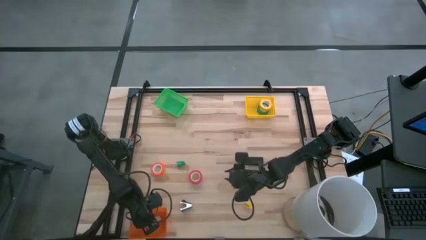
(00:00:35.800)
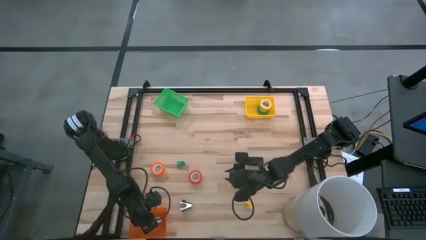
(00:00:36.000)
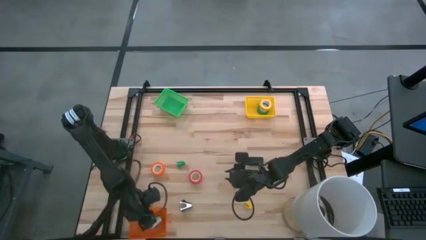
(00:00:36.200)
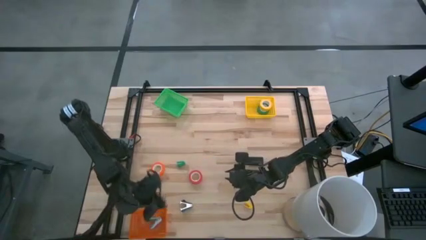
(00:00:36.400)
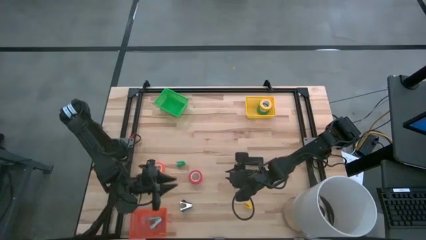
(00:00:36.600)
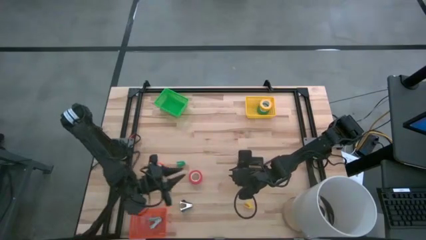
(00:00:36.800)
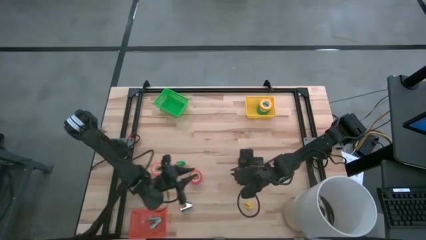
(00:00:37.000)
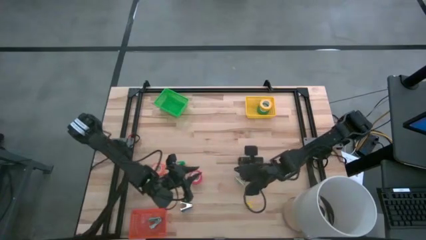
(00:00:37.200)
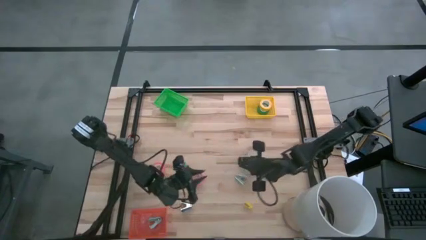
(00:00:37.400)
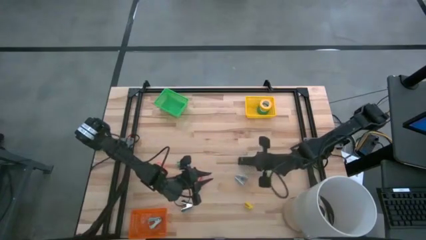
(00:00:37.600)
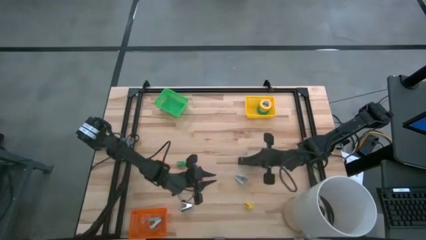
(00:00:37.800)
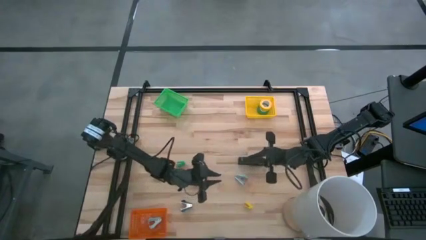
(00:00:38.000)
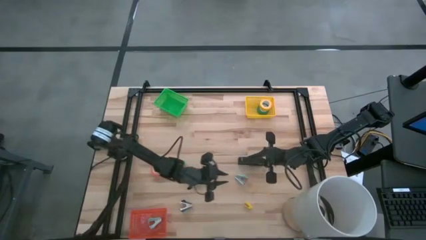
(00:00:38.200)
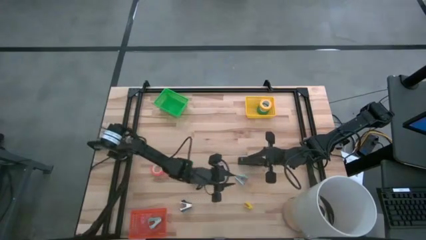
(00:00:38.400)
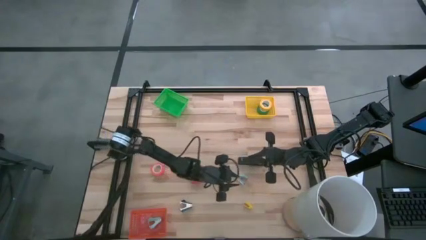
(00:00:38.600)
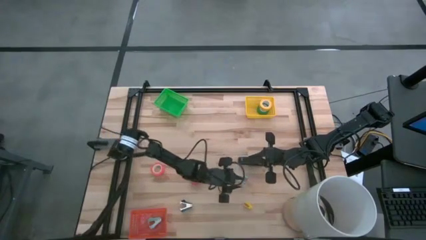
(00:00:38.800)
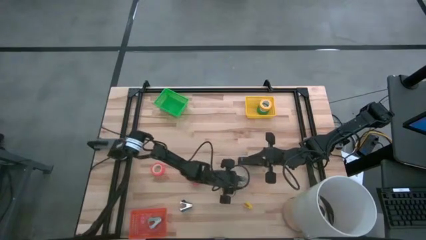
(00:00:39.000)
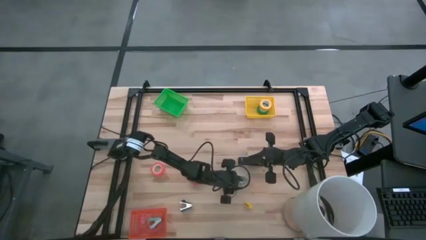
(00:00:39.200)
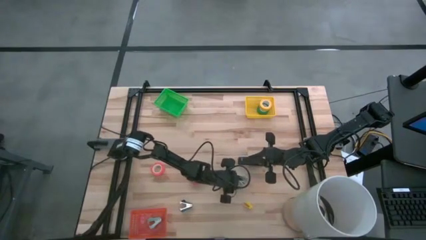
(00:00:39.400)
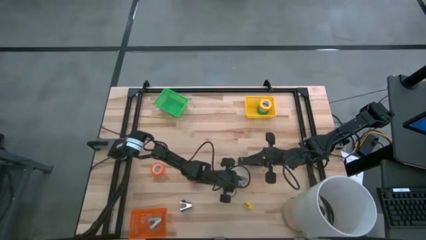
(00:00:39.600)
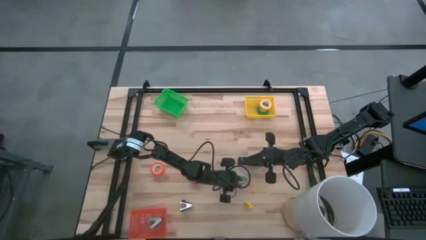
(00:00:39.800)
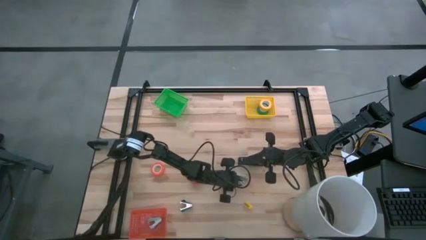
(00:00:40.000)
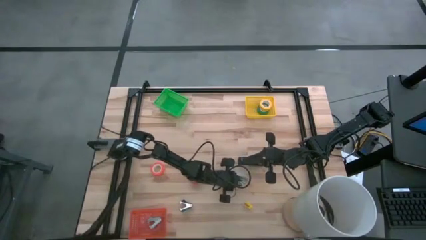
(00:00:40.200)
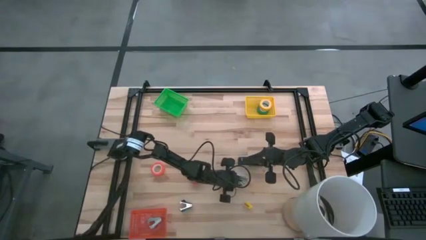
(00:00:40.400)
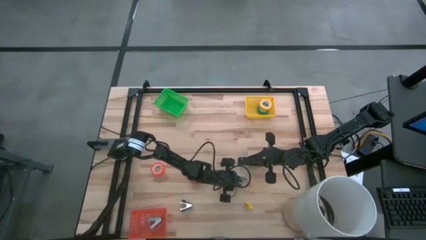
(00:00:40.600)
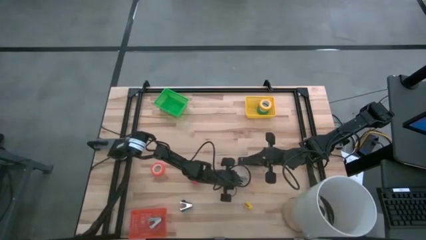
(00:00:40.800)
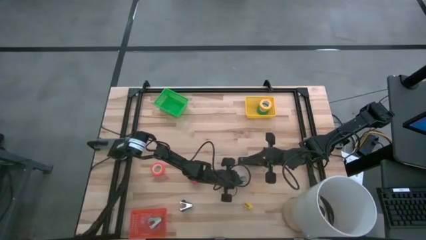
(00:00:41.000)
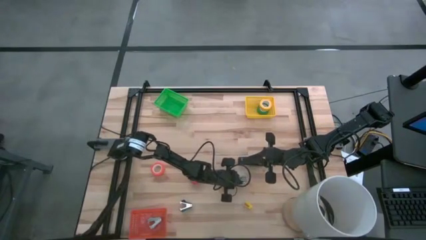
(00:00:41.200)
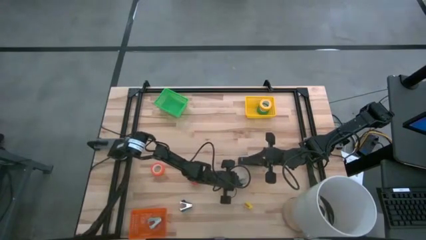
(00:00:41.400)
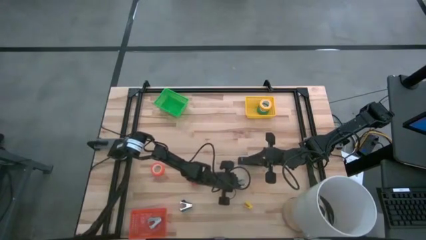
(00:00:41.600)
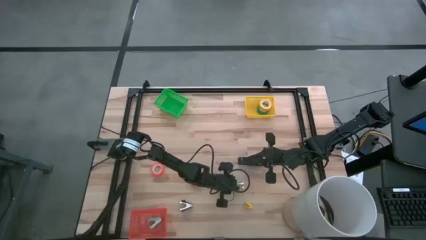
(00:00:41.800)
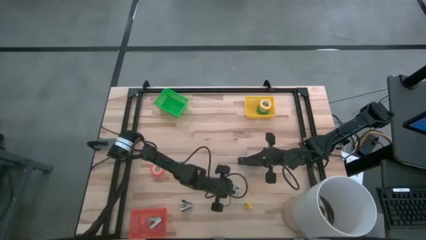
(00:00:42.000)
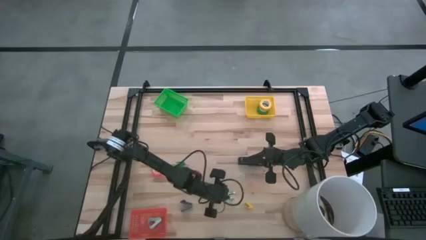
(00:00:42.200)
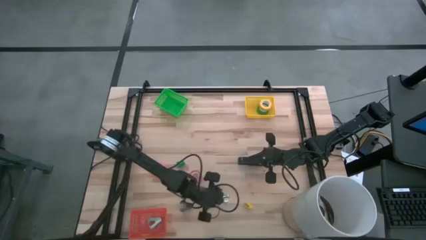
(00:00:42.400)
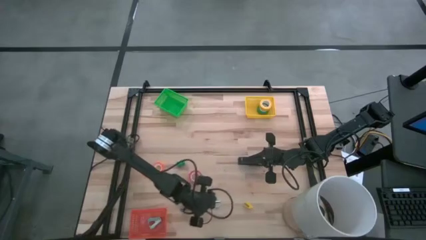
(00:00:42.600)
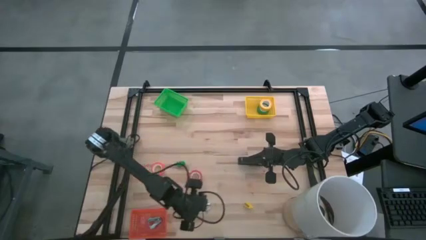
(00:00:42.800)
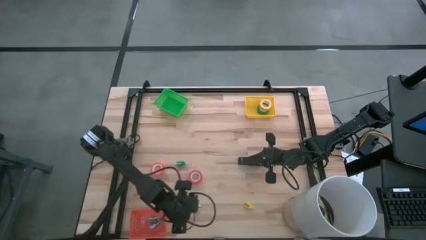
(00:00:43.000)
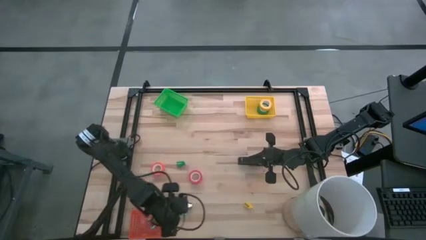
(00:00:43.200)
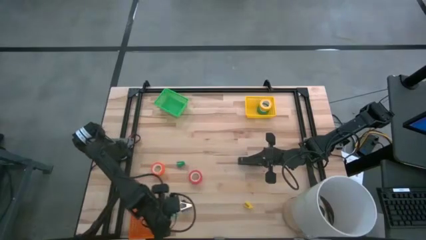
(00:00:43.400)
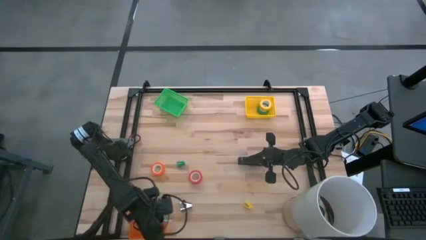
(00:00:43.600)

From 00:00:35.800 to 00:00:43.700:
Task: Pick and place Stapler, Stapler remover, tape
Put the blue staple remover into the orange bin

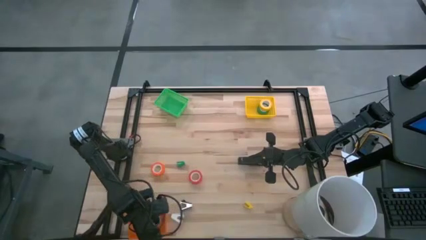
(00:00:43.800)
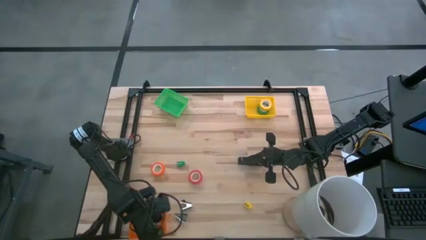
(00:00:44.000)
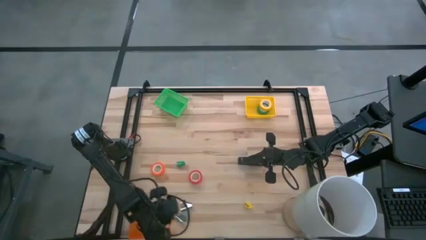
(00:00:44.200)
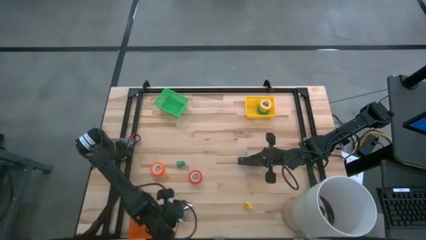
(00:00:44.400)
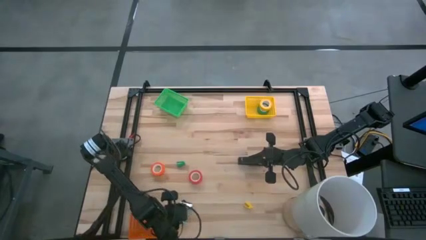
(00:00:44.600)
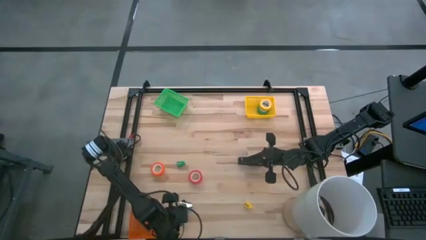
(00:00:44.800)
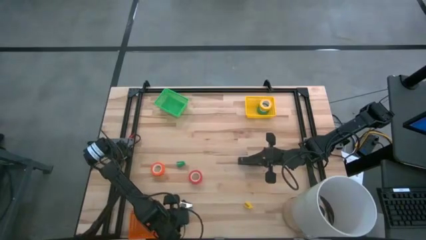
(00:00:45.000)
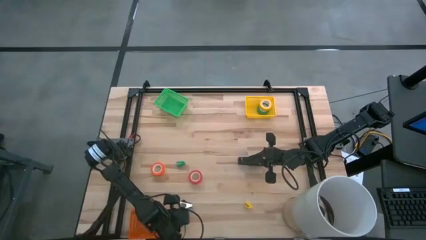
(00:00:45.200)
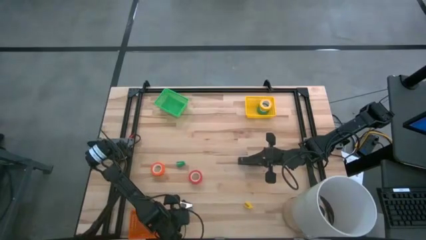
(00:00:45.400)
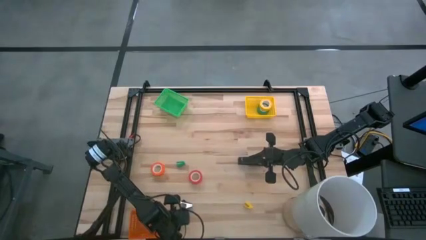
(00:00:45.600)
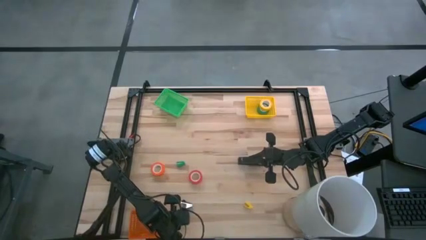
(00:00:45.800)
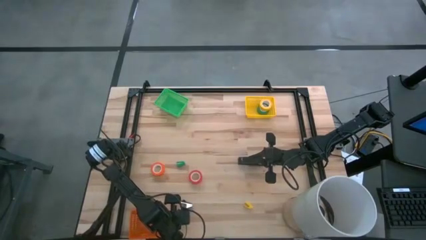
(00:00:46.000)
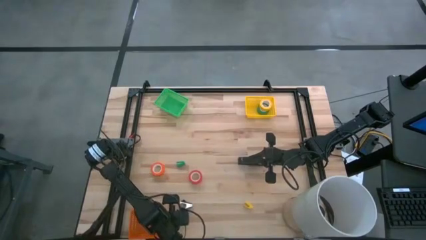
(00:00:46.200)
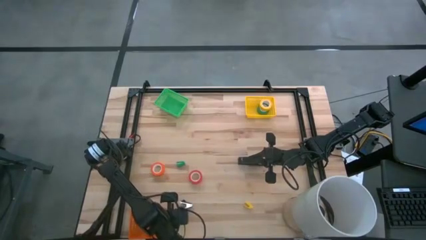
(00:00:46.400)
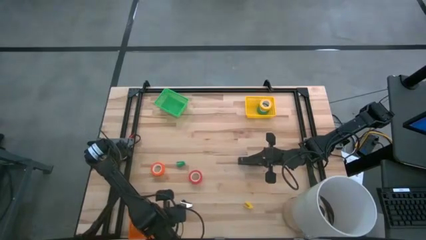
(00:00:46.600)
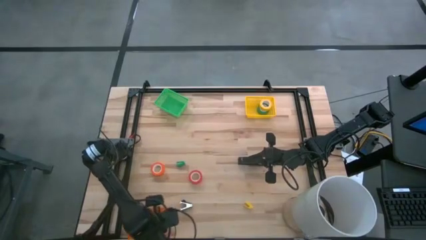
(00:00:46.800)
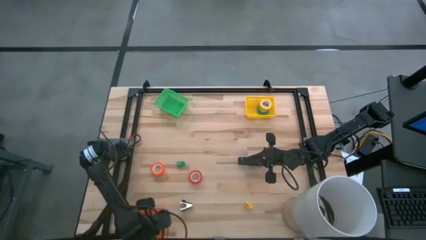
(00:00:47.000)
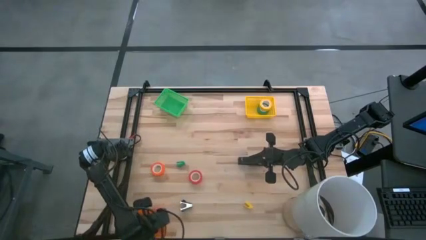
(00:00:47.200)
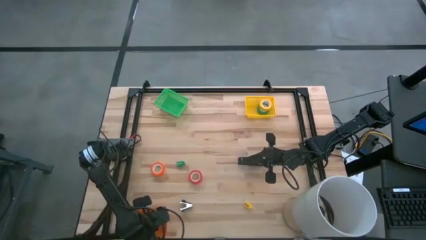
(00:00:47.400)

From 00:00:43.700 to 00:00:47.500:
Put the blue staple remover into the orange bin

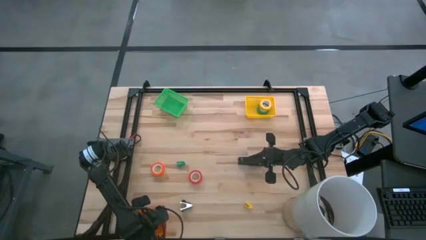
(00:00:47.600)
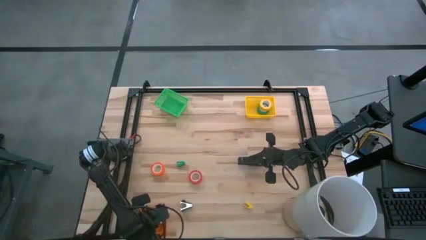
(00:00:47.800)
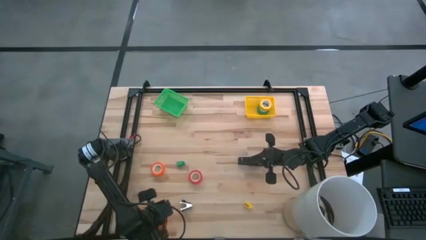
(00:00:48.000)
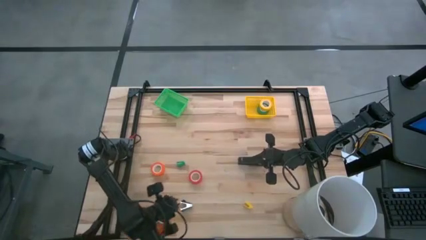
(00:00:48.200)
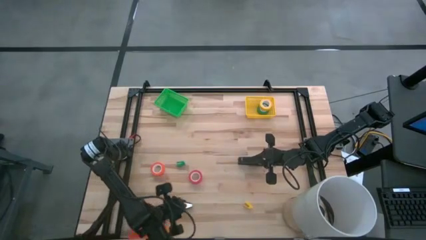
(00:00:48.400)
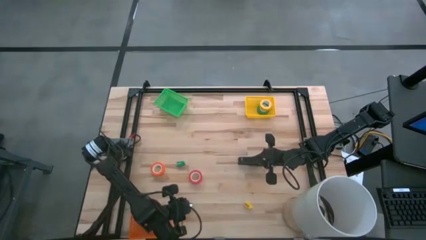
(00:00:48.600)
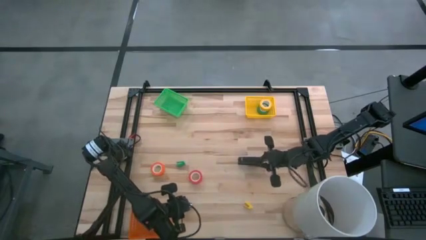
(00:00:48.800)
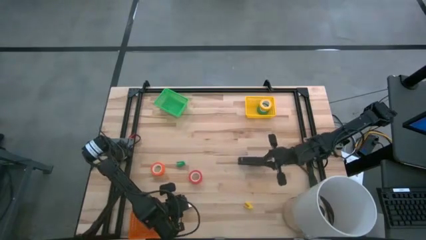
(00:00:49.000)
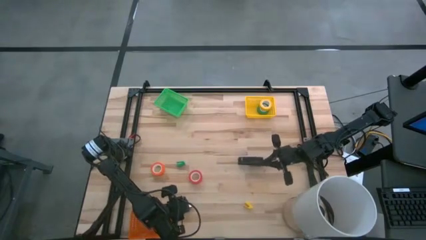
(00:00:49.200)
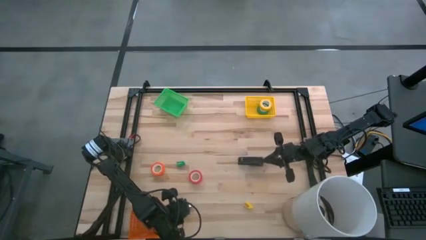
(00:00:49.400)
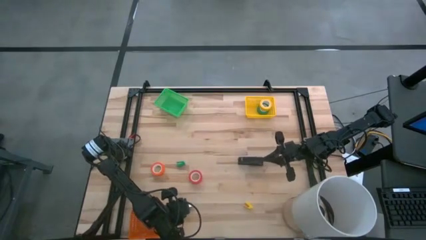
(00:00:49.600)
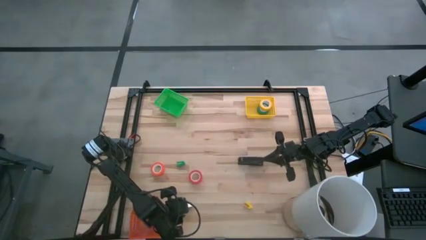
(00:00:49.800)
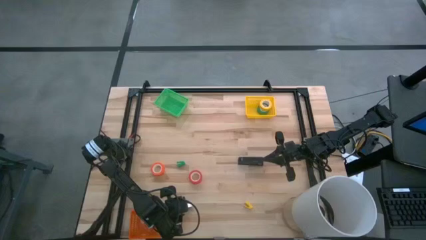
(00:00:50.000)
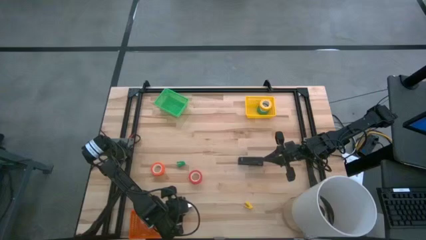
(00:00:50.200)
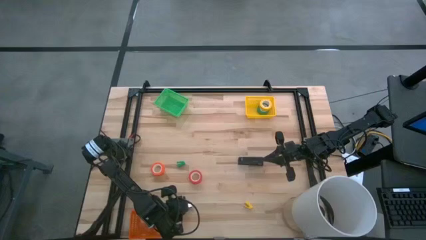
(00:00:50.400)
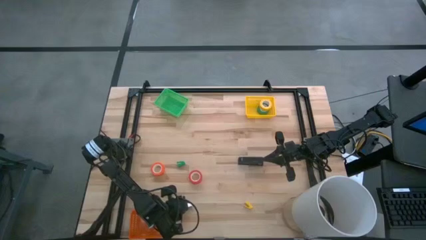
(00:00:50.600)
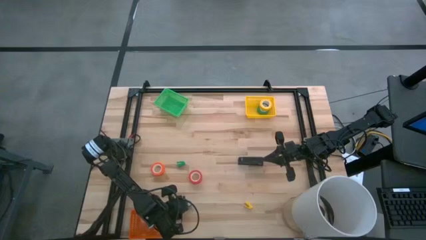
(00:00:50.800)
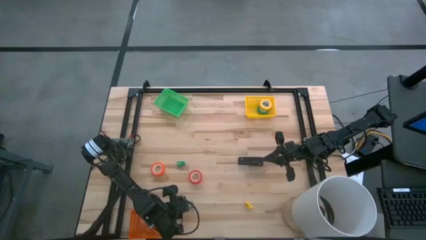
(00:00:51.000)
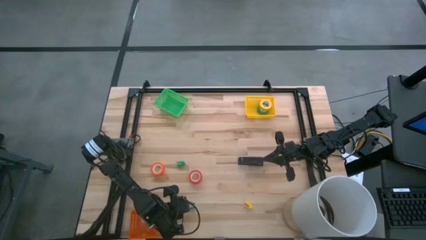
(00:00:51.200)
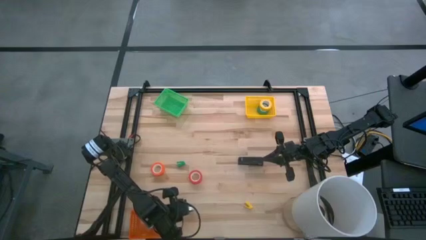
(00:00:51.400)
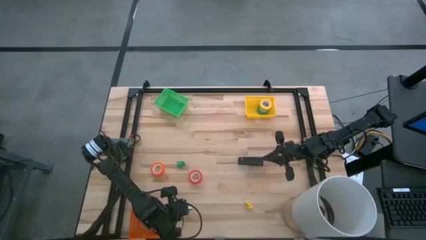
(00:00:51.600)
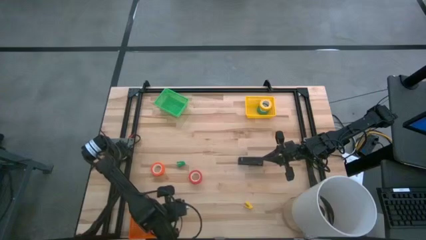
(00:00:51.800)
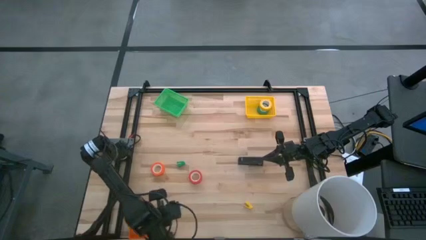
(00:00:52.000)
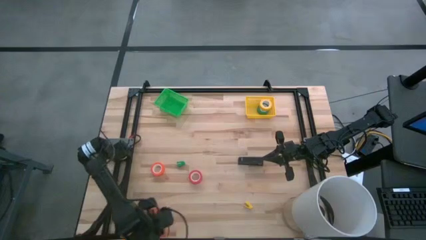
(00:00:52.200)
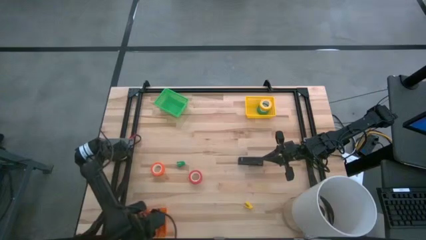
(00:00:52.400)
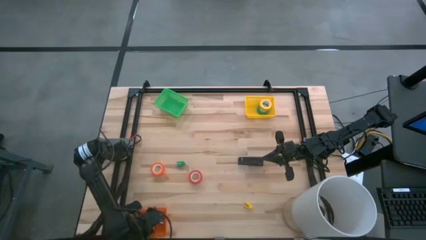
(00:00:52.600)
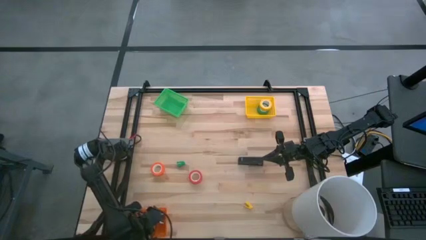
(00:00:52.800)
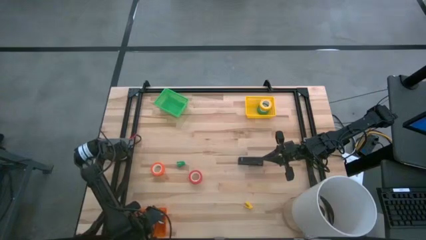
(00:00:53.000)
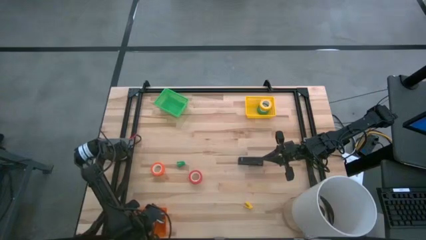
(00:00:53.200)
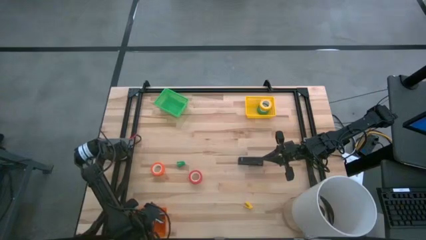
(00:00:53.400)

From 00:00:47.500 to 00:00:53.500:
Put the black staple remover into the orange bin
